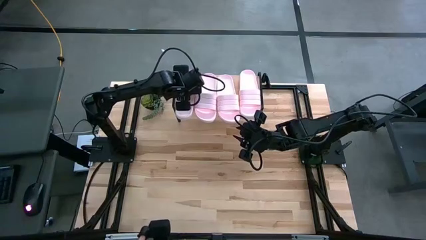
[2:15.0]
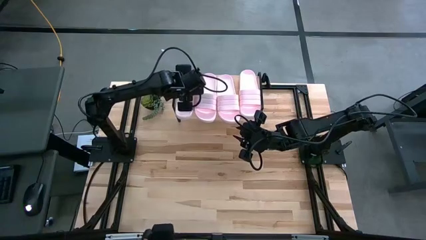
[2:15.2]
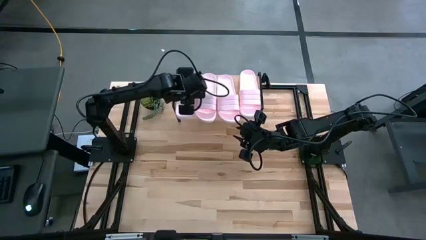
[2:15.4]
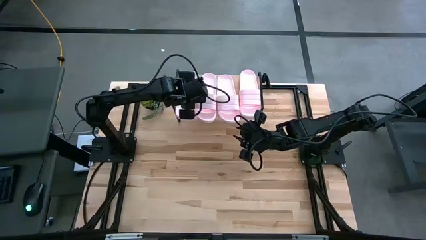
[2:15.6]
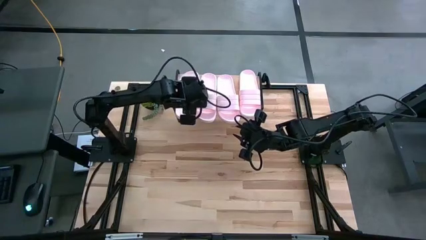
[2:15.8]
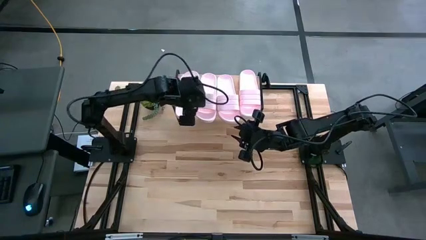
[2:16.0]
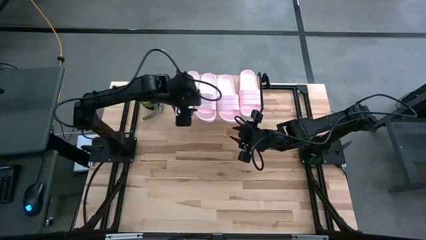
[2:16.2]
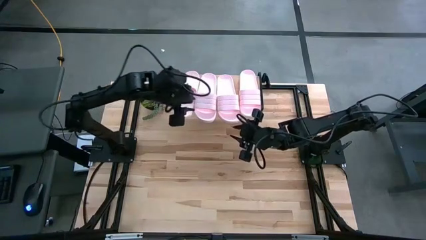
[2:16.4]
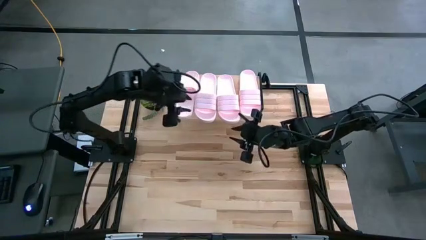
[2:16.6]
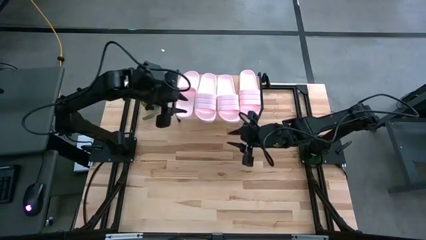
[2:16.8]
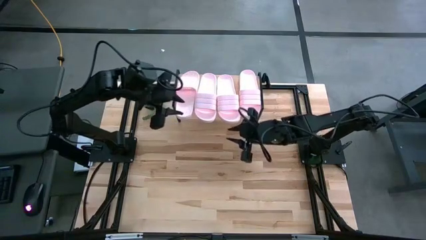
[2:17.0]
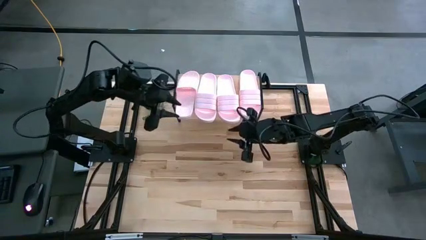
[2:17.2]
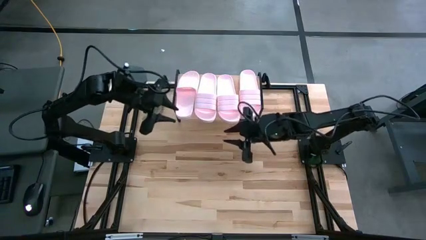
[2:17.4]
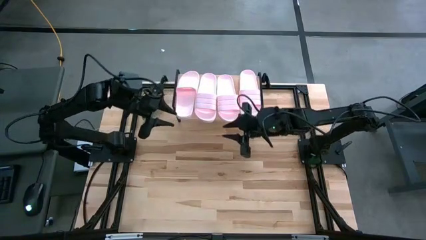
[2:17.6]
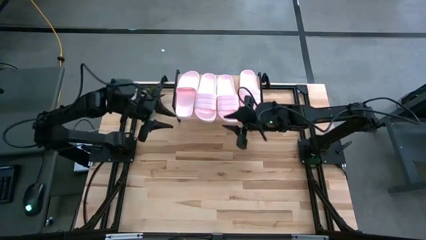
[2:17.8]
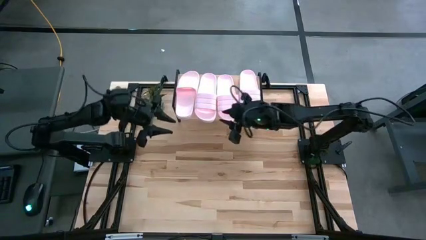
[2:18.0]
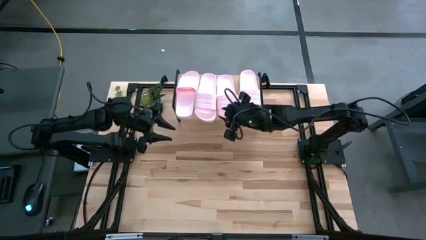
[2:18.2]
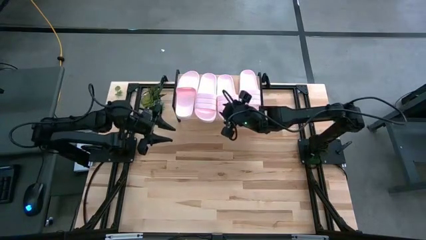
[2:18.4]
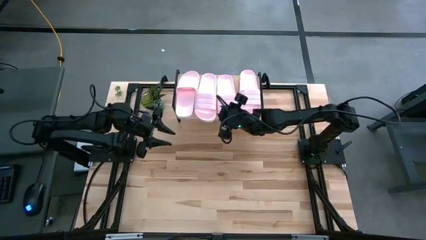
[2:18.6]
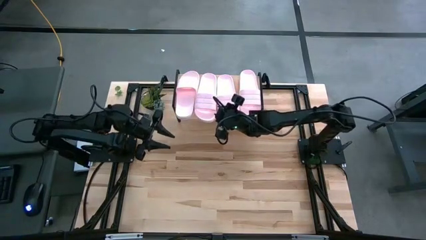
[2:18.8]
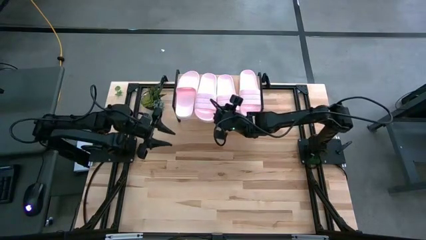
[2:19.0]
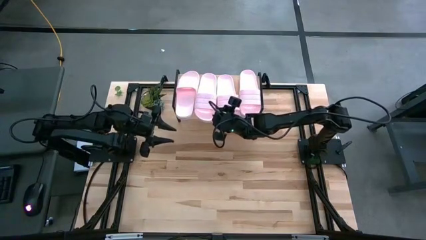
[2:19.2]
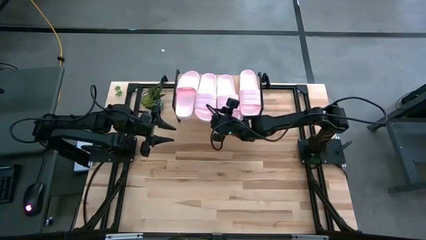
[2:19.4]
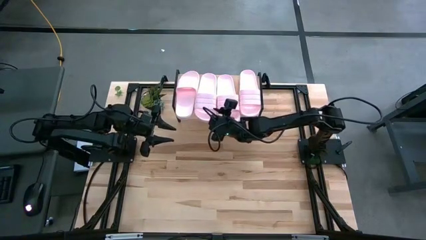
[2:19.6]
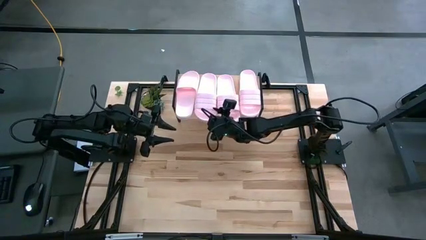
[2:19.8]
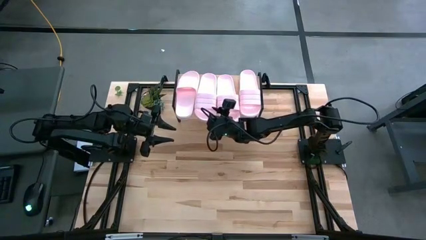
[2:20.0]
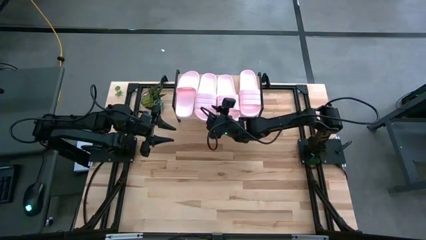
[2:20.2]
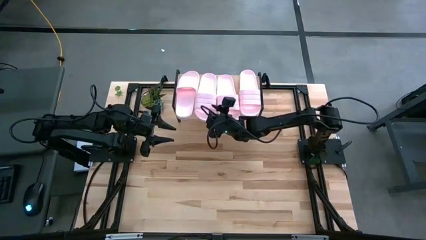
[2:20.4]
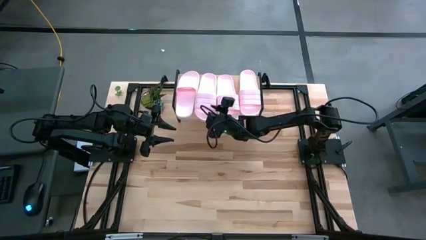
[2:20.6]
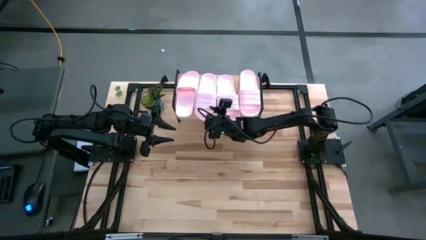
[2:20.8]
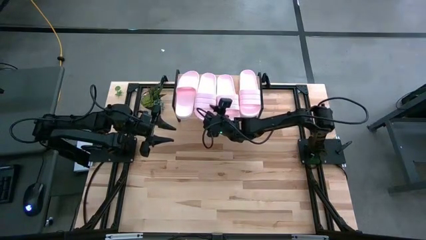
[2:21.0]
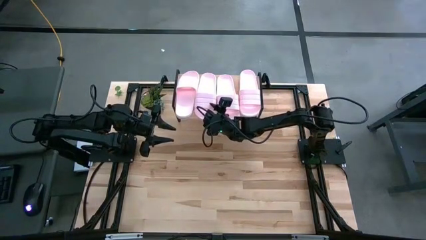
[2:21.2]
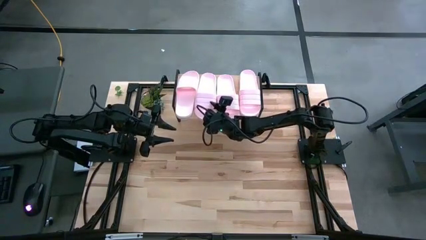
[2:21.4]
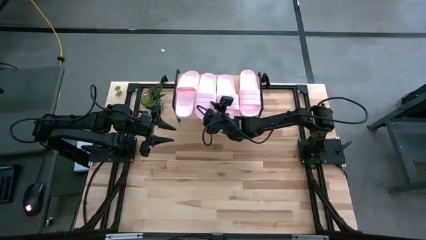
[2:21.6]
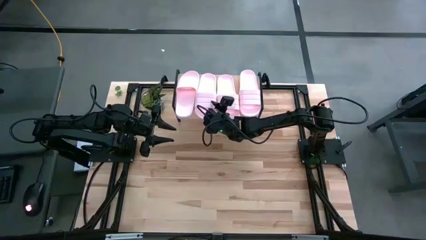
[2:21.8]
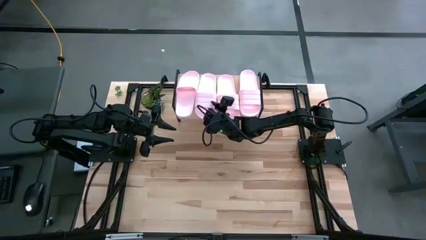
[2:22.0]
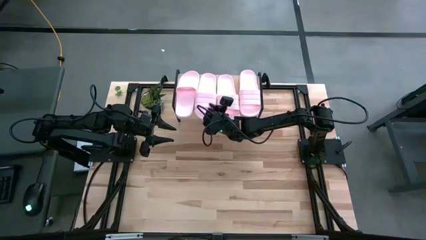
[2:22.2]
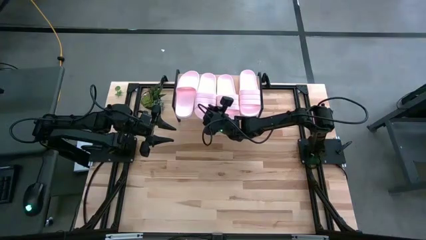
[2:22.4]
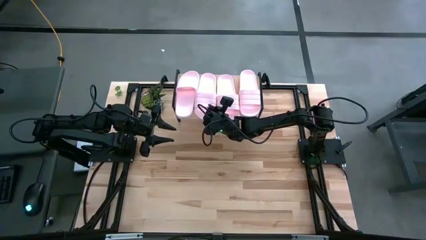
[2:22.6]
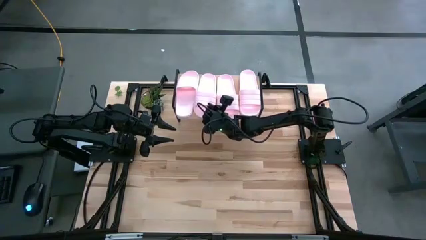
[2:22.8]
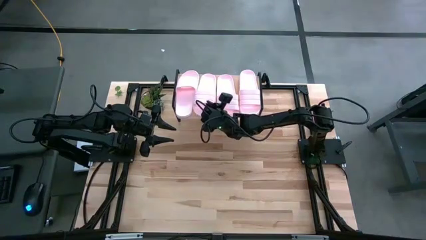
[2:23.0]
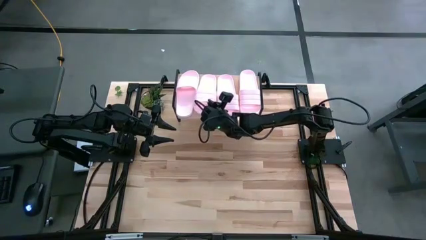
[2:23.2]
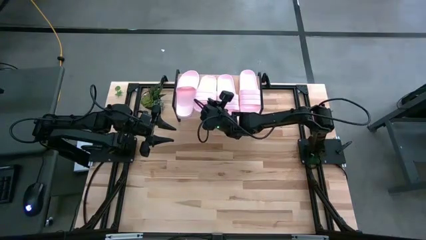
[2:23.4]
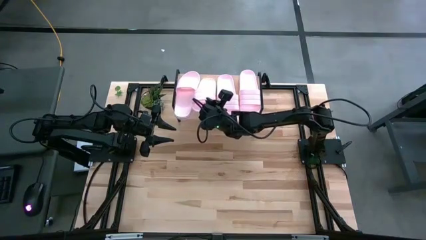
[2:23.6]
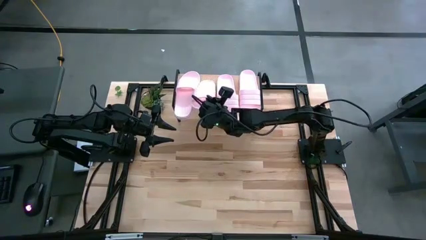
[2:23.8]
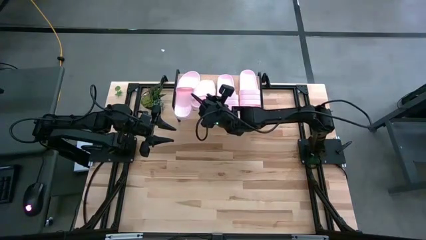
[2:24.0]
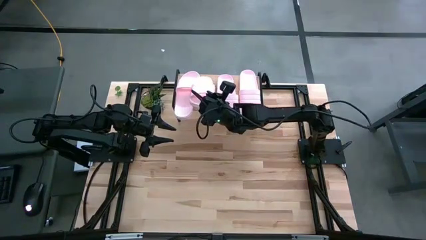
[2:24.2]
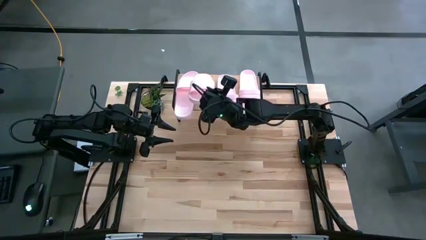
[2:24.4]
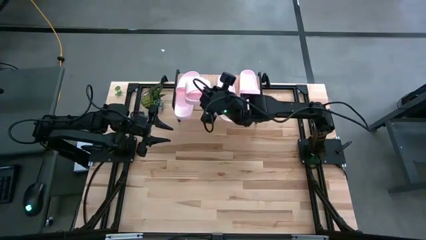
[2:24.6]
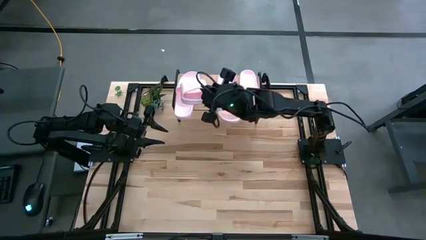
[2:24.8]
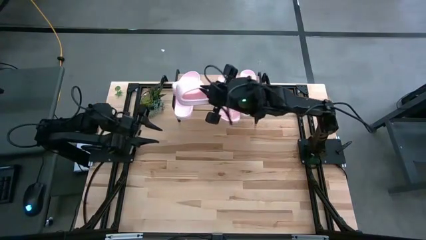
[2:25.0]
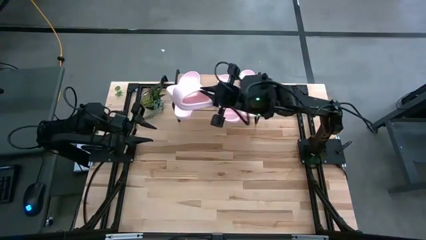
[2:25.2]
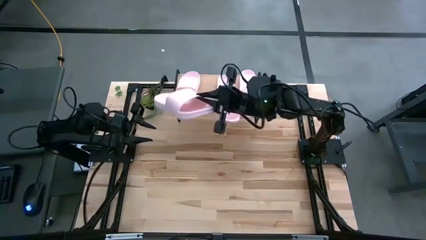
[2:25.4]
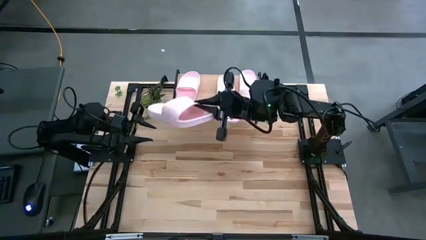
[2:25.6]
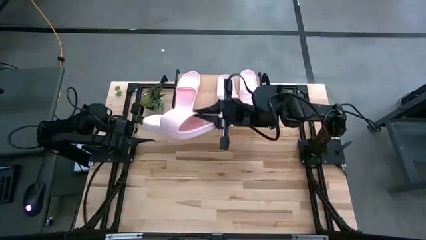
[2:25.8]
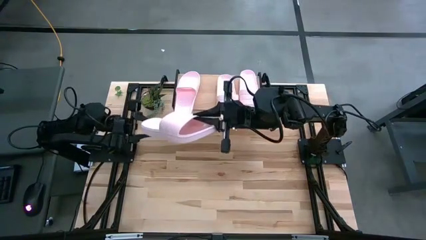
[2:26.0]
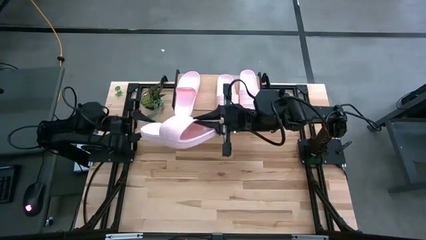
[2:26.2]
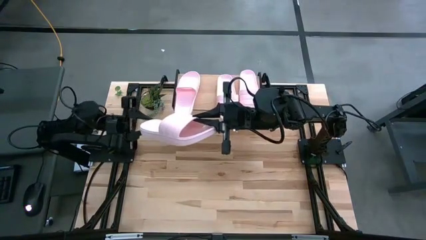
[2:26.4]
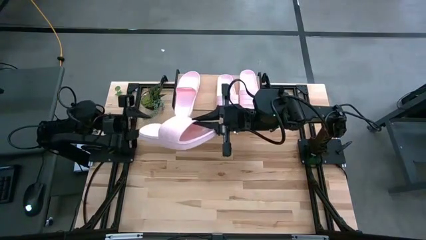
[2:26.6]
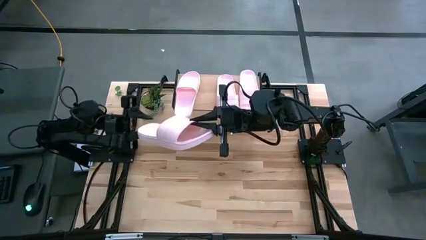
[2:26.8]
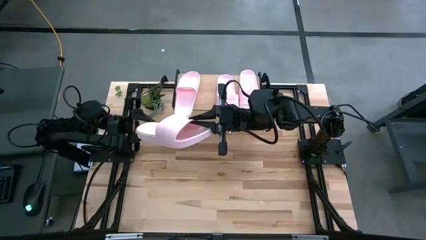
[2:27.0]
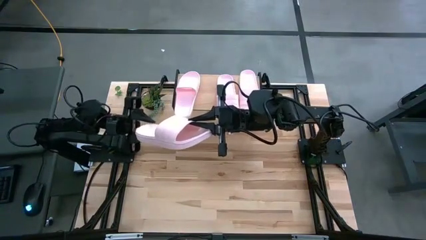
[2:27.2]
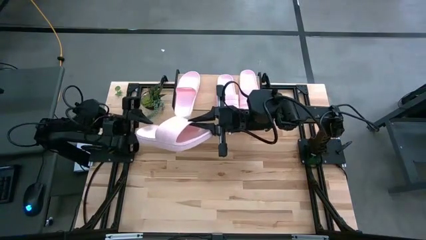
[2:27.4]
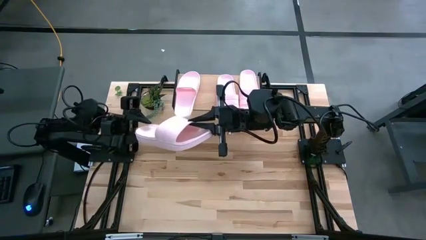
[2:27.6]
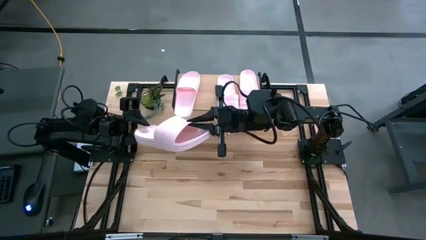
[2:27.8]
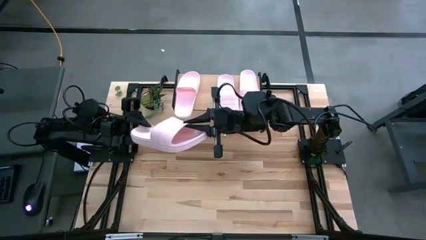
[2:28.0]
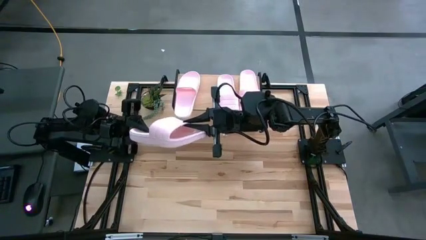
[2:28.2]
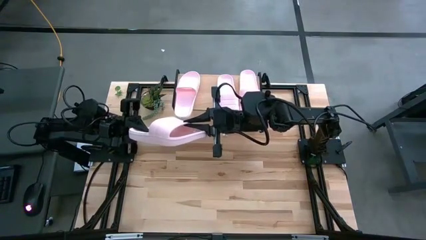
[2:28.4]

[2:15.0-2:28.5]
Task: Pick and place slides into the shelf
Adjust the pink slide

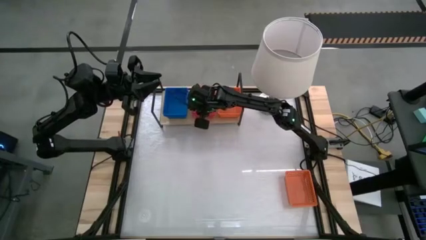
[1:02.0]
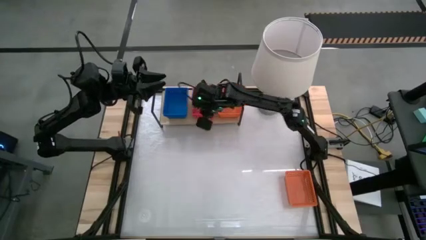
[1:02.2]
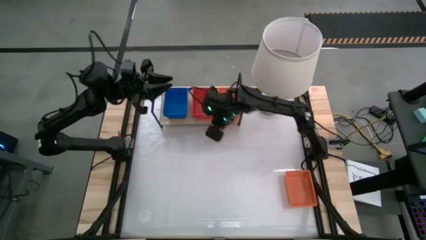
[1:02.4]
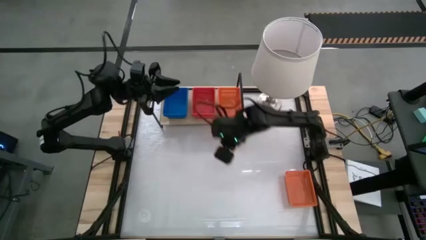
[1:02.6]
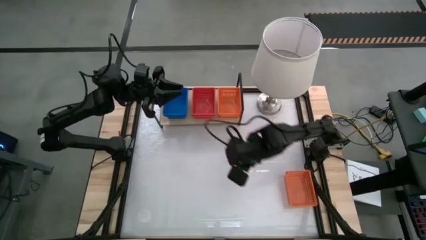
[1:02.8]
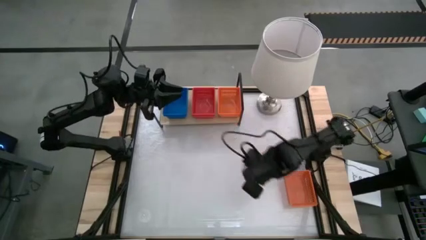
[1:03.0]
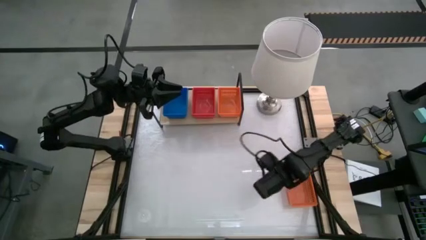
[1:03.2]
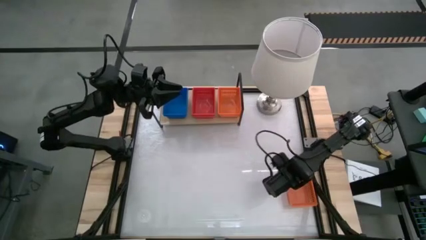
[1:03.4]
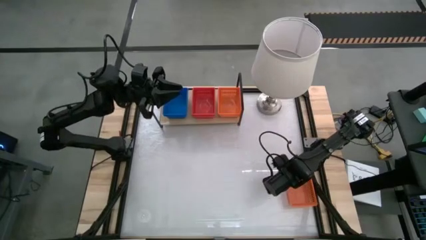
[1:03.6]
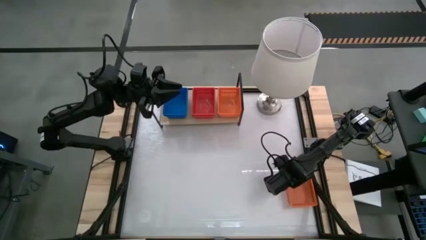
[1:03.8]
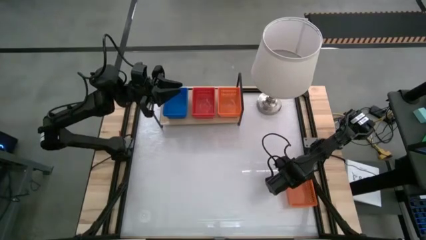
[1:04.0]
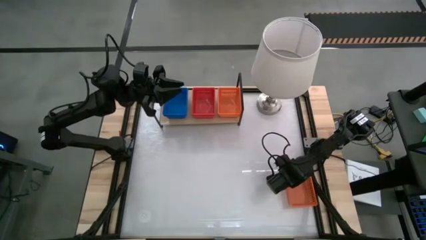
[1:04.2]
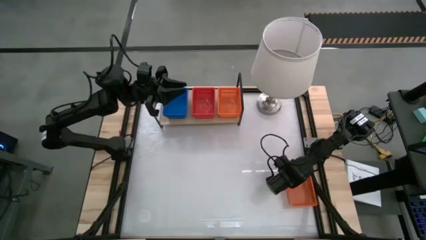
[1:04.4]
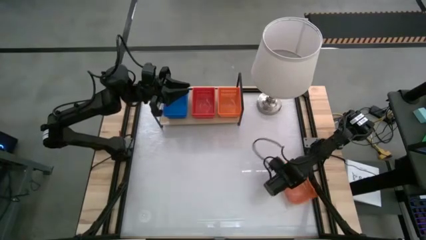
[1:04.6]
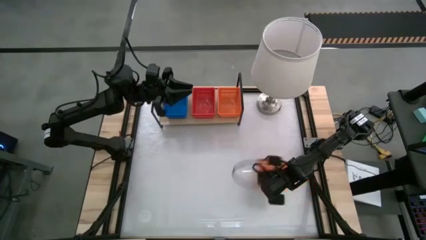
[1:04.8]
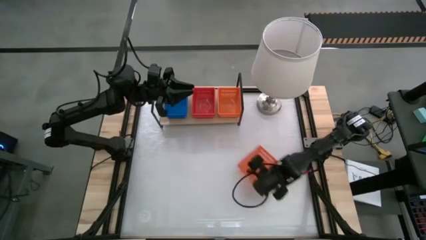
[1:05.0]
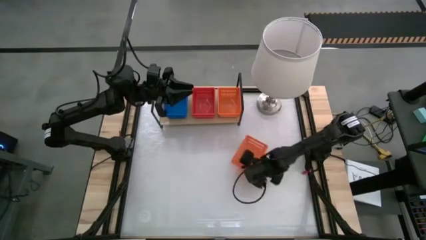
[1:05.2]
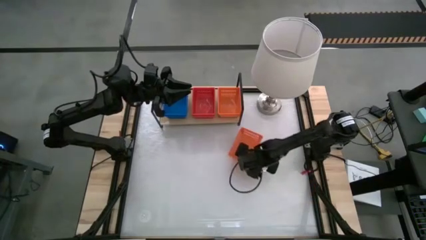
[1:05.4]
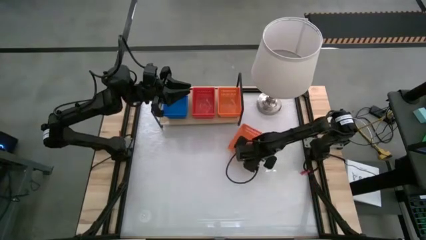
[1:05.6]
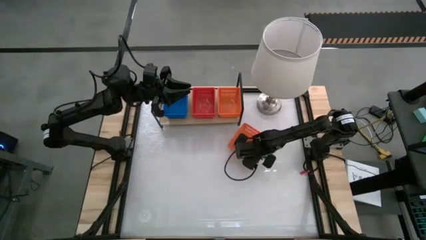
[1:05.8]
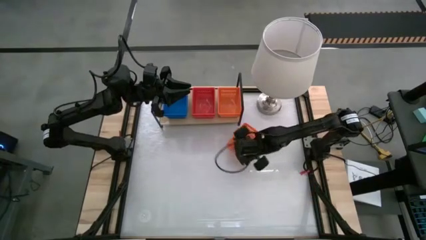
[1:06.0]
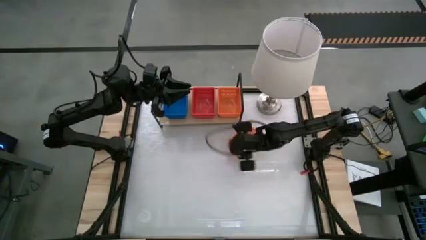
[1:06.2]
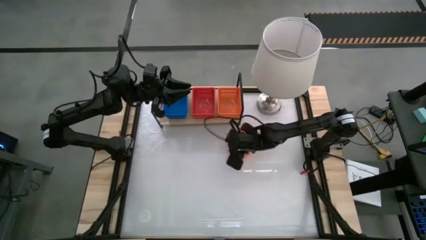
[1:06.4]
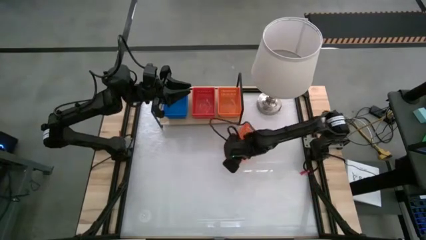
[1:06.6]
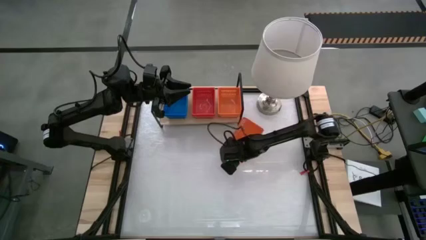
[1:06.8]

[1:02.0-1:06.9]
Task: Stack baskets on shelf by color
Stack the orange basket on top of the stack orange baskets on the shelf
